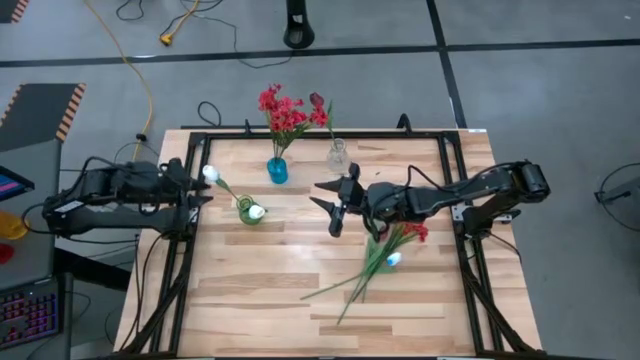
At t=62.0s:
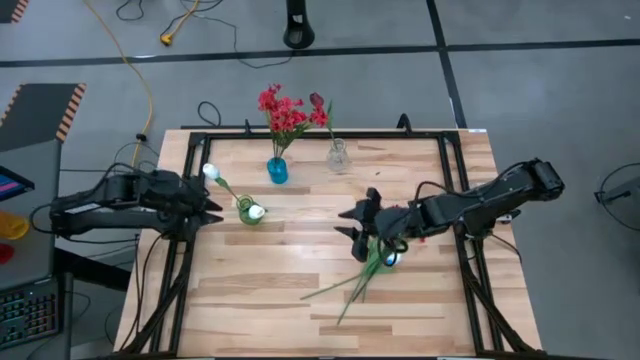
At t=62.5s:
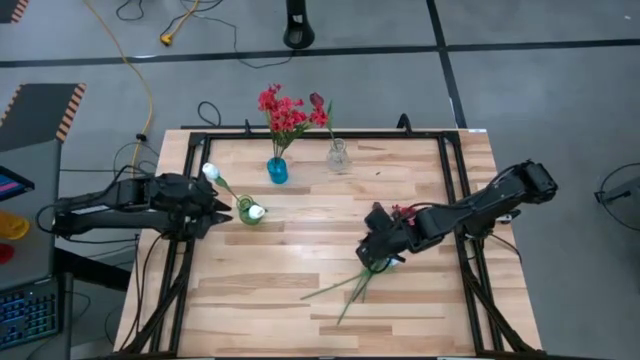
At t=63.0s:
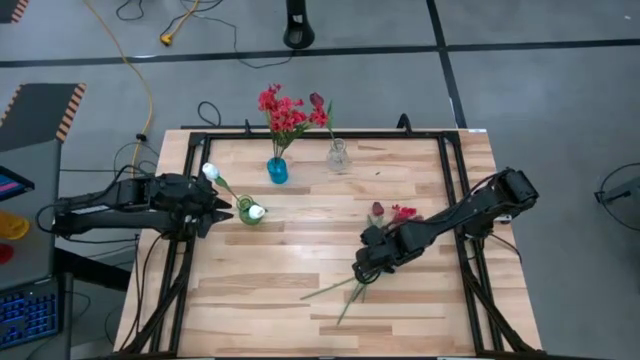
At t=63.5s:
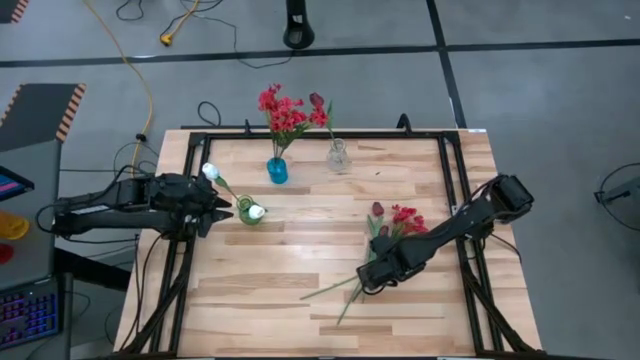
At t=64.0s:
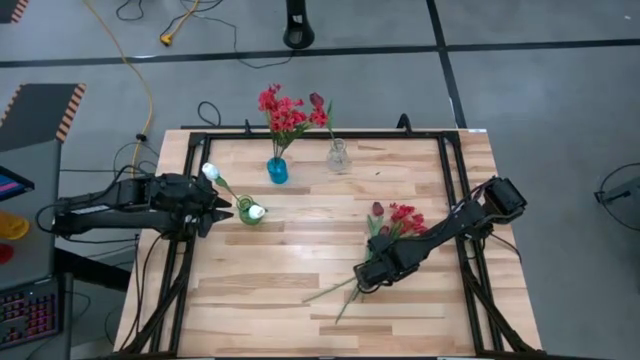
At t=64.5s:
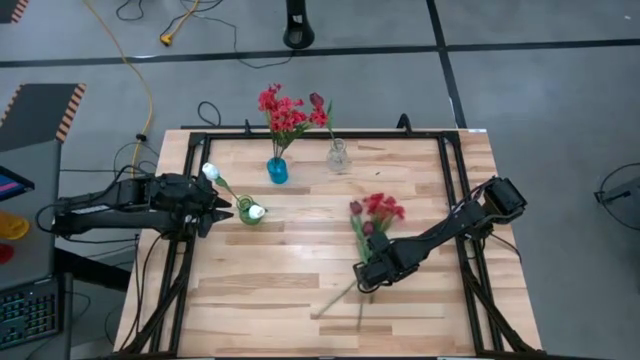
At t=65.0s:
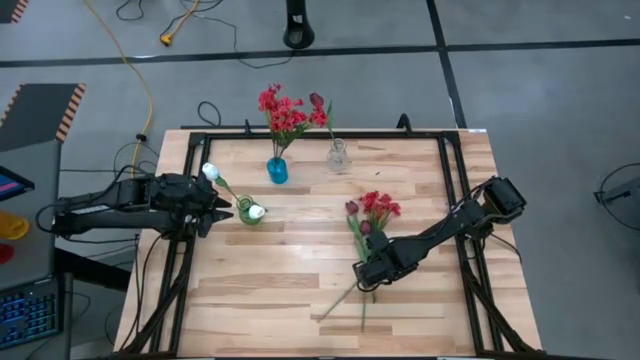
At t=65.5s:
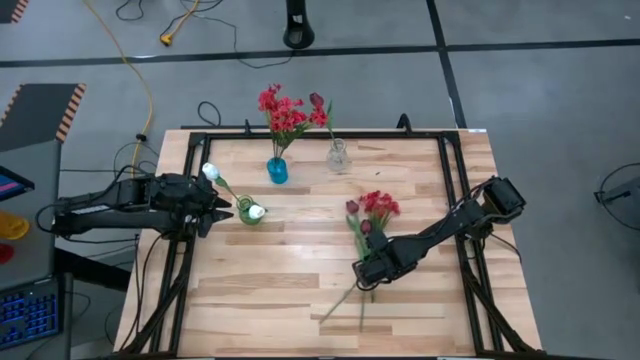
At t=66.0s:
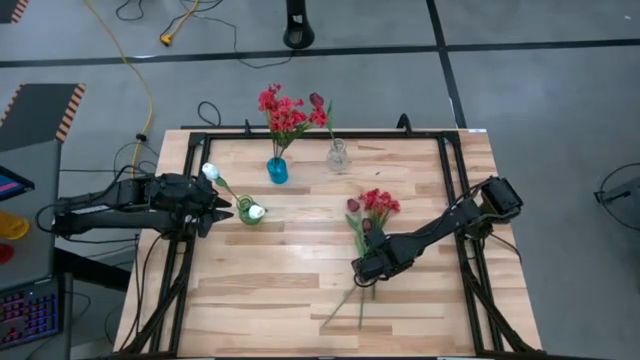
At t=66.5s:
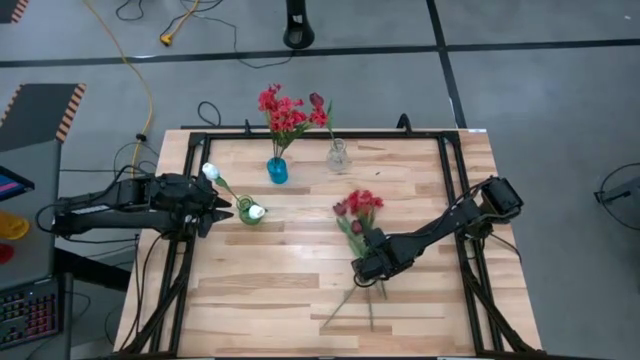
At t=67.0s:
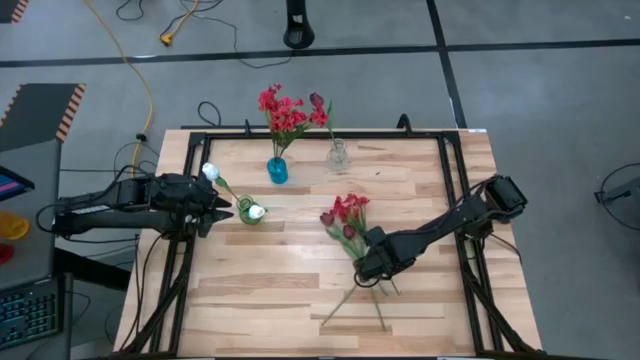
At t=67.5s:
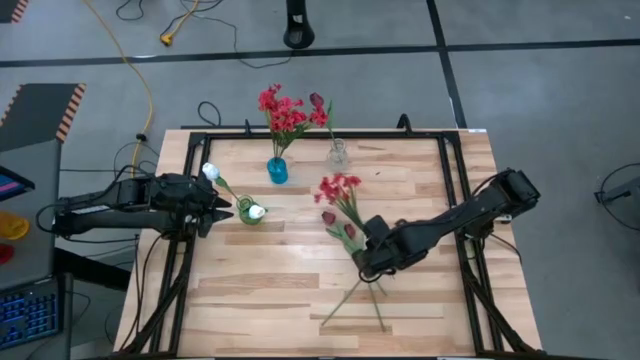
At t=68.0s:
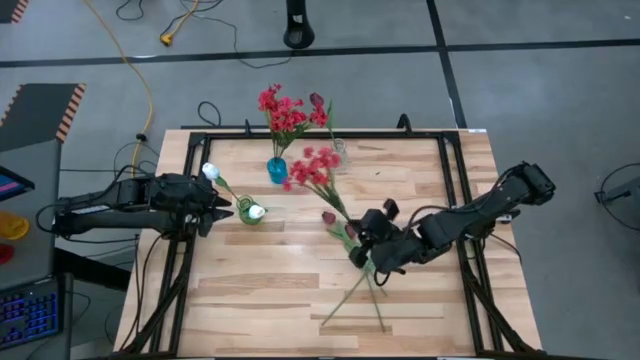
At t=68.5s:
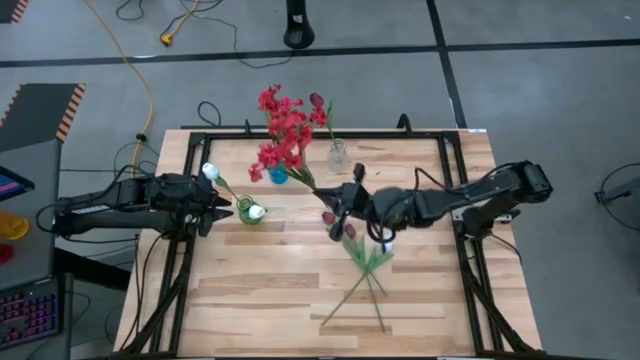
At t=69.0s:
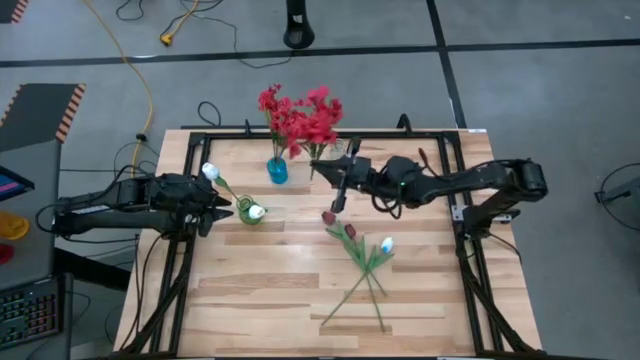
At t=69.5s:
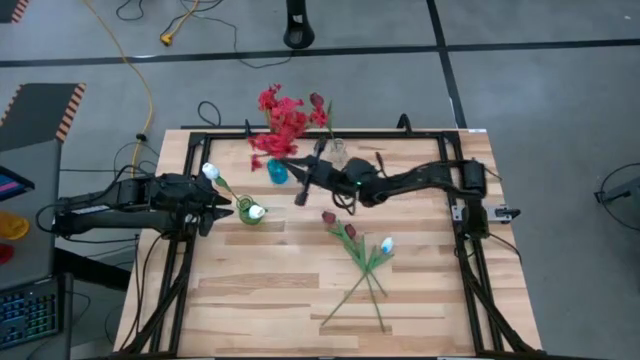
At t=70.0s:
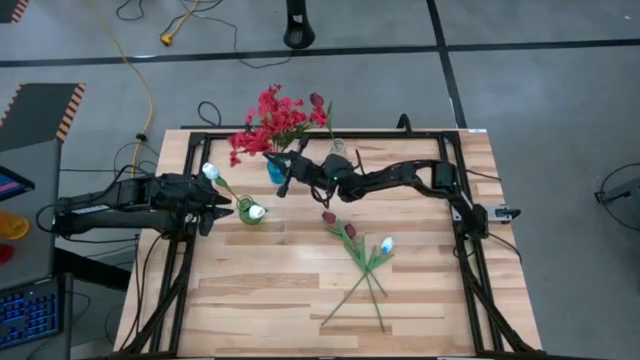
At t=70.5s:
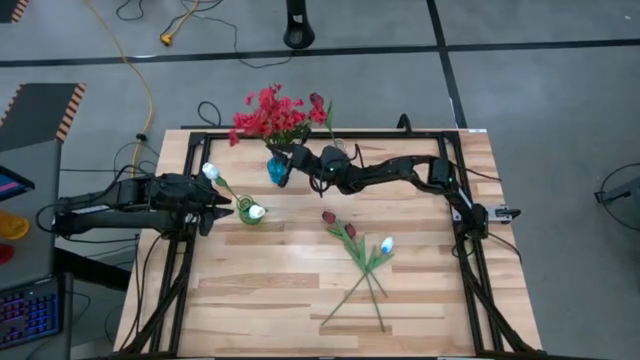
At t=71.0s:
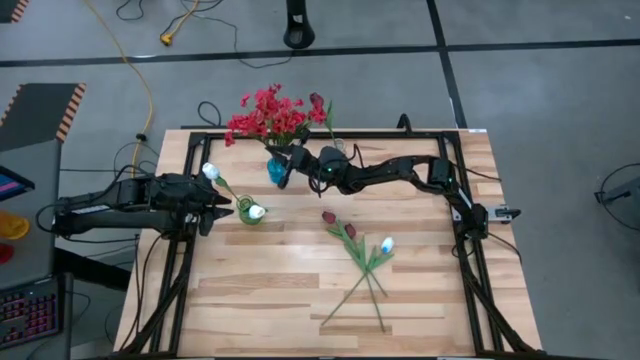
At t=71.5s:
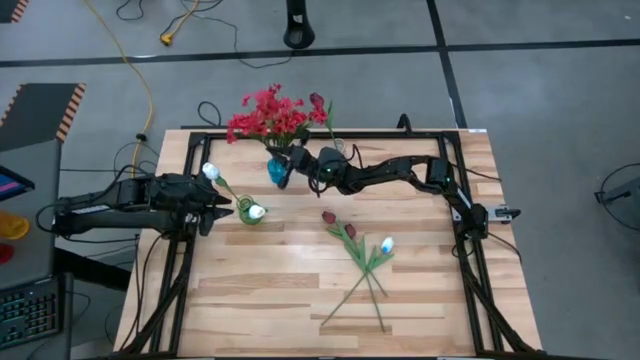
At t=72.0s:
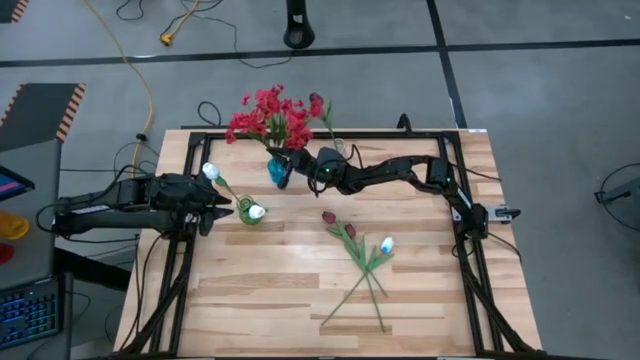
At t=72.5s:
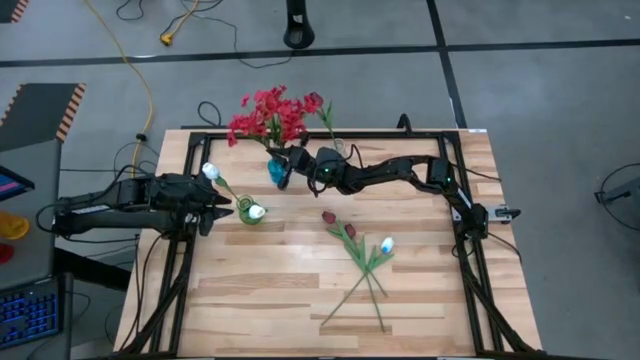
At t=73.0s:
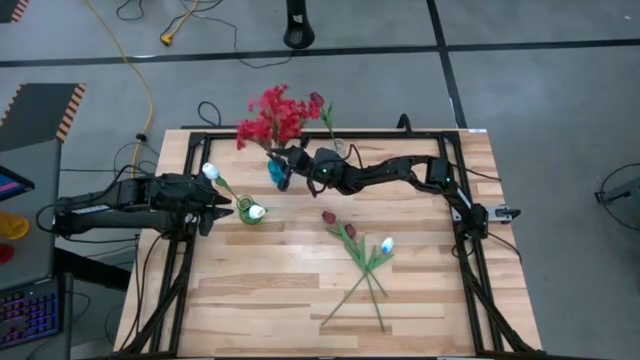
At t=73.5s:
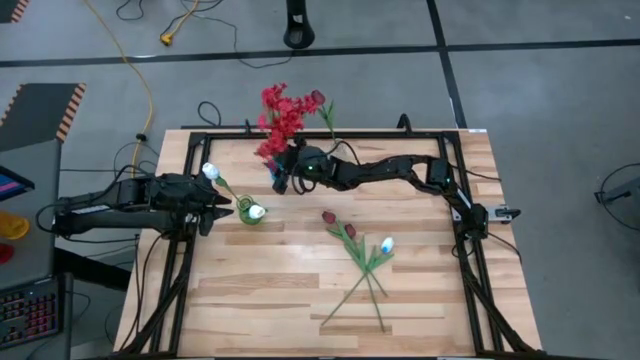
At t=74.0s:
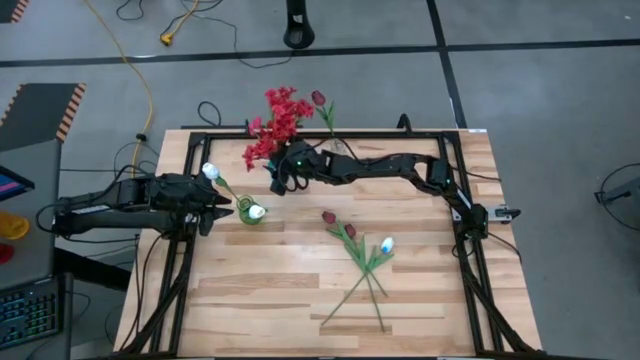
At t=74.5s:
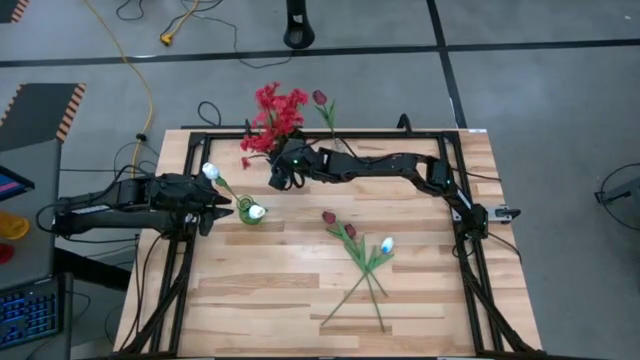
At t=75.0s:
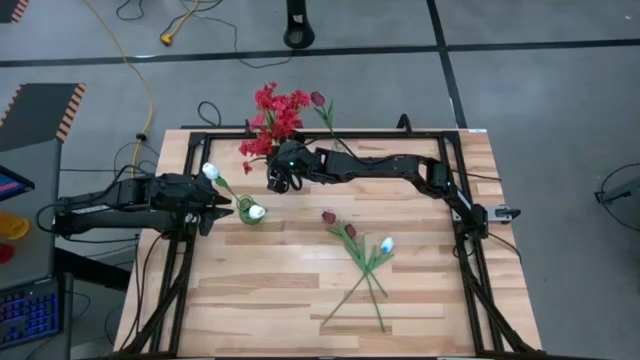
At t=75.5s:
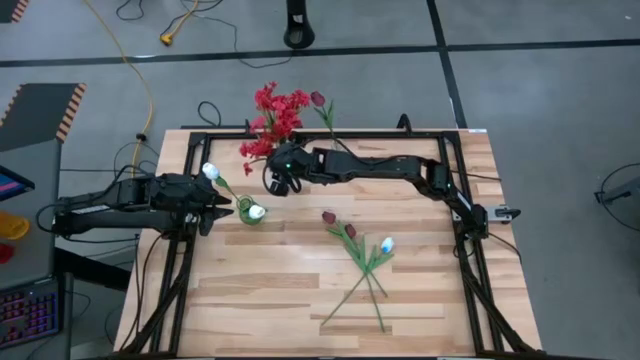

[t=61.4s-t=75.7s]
Task: Sort flowers into vase by color
Put the red flowers into the blue vase

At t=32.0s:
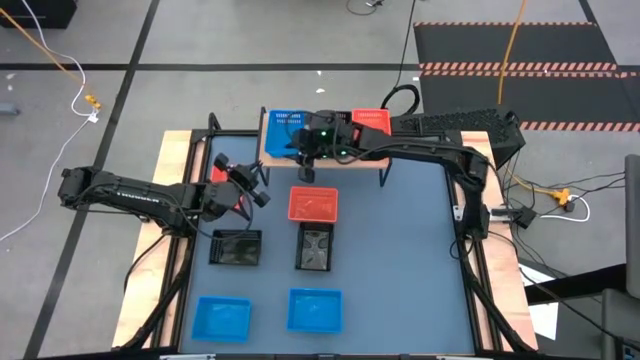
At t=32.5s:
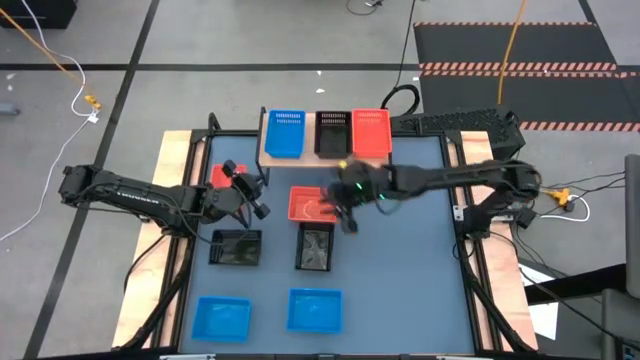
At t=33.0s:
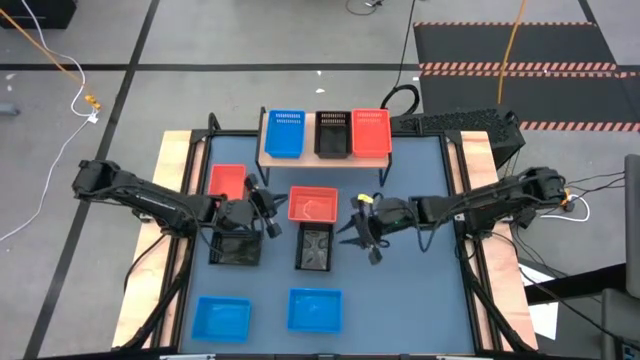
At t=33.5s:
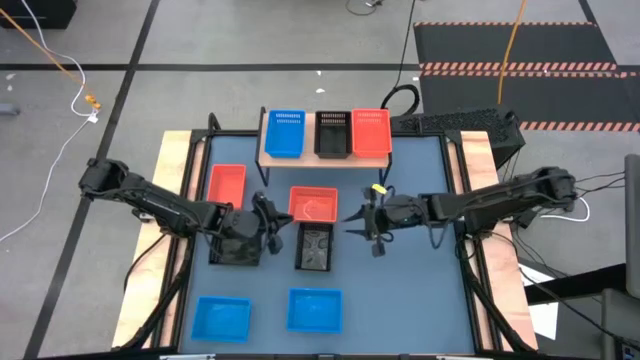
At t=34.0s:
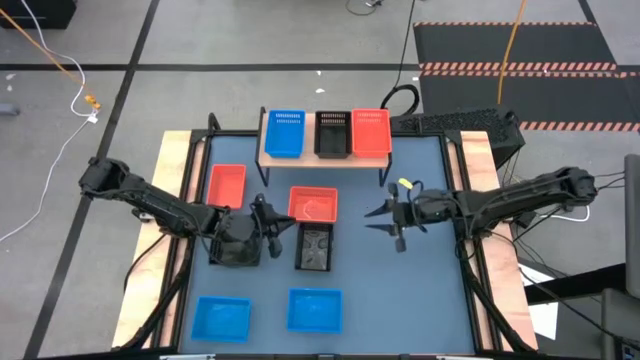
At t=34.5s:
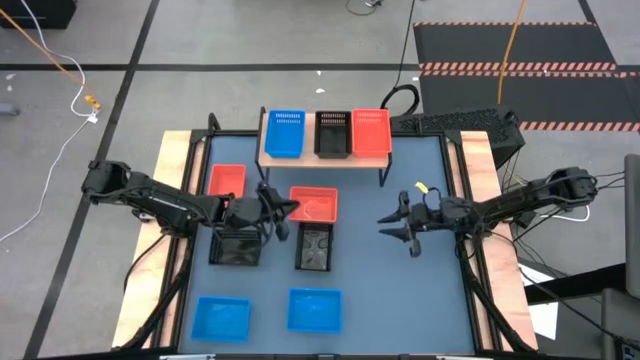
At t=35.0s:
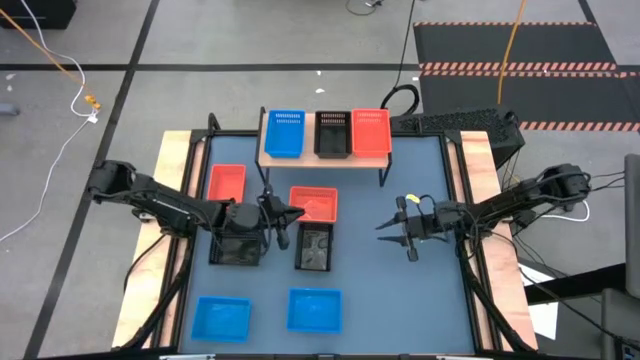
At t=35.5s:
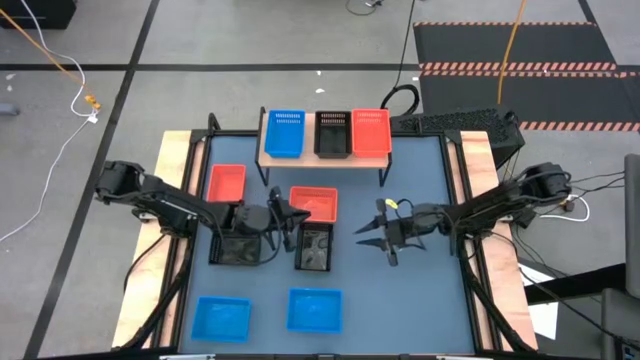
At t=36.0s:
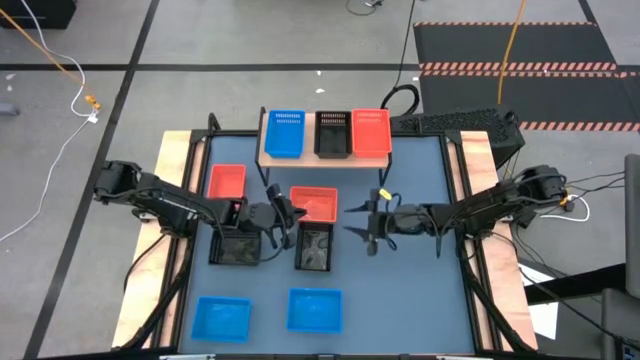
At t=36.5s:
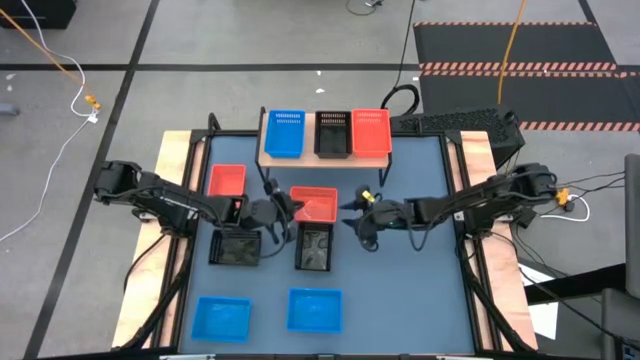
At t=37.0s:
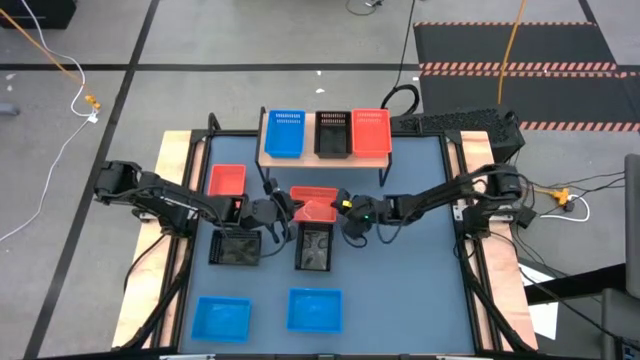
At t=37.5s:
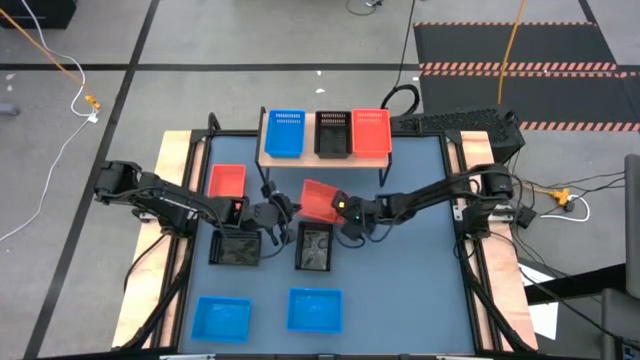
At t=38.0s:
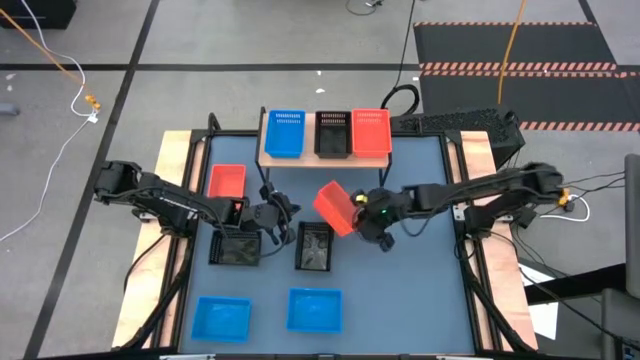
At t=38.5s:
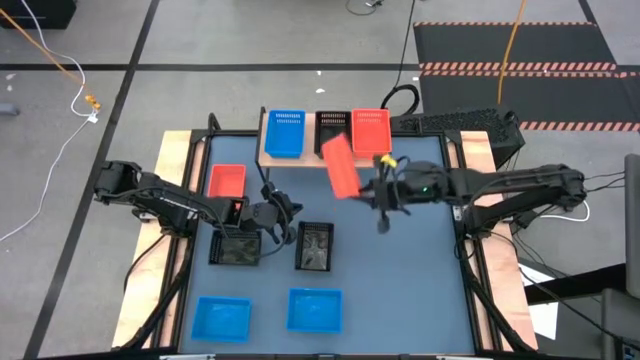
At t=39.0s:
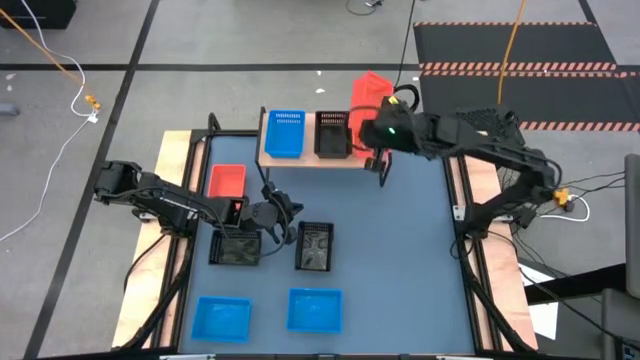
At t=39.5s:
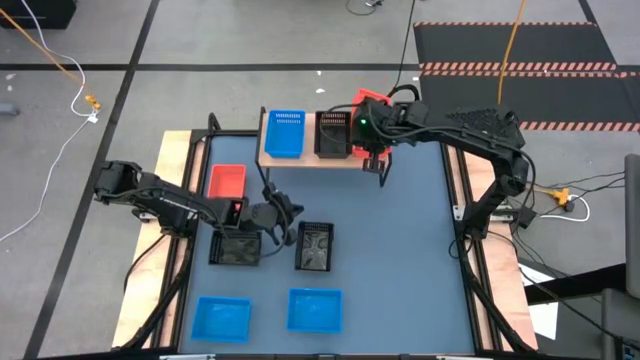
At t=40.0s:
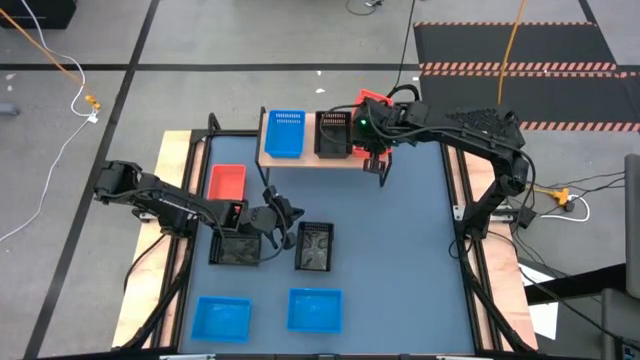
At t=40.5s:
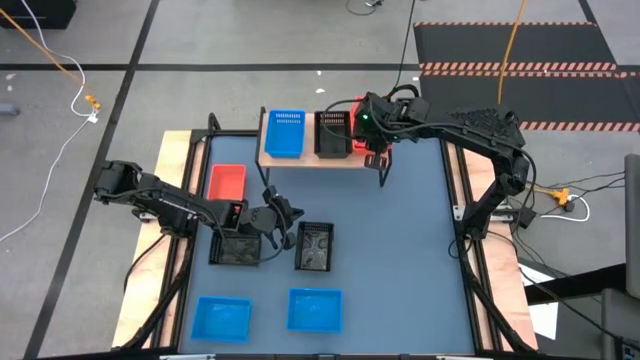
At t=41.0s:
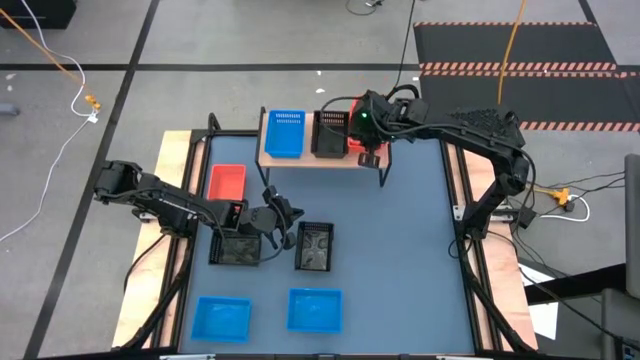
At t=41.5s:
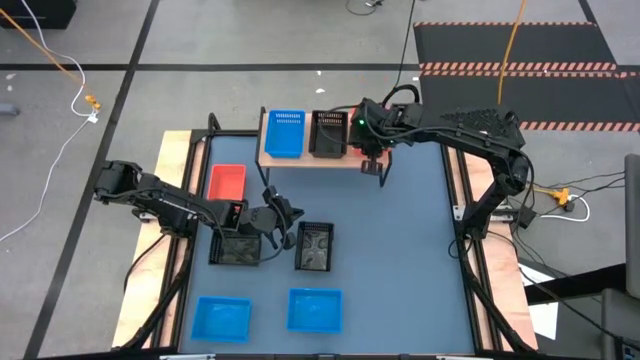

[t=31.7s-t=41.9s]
Task: Stack baskets on shelf by color
Stack the right orange bin on the orange bin on the shelf
